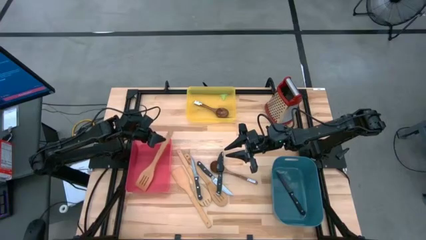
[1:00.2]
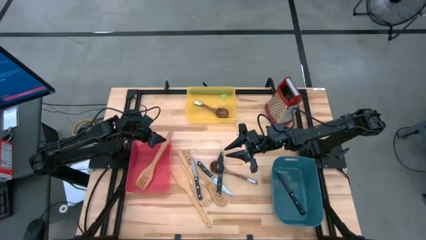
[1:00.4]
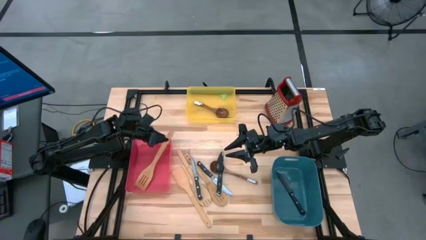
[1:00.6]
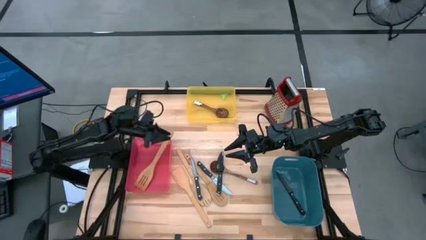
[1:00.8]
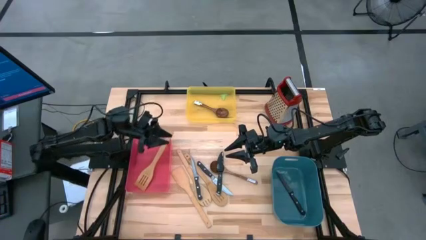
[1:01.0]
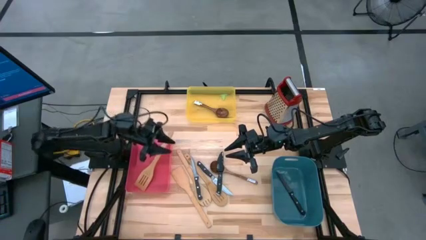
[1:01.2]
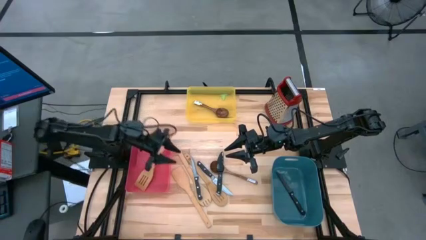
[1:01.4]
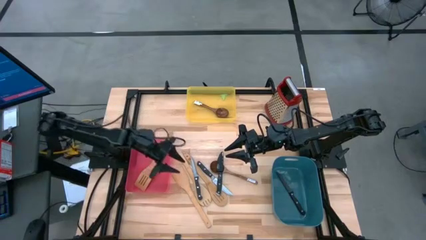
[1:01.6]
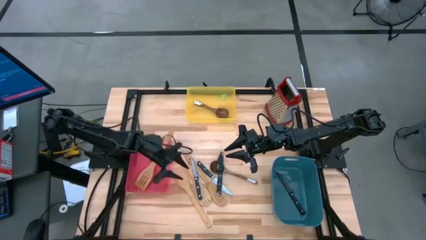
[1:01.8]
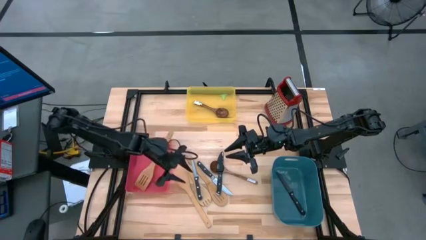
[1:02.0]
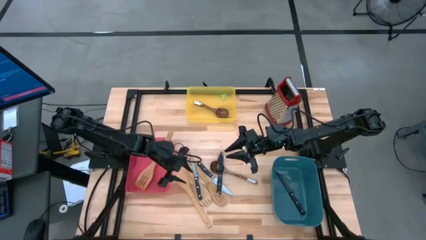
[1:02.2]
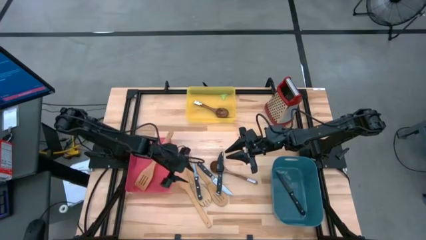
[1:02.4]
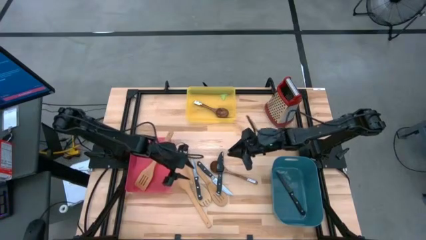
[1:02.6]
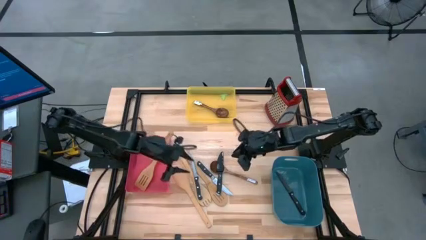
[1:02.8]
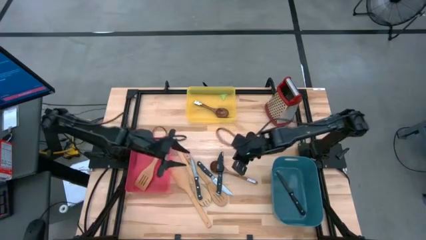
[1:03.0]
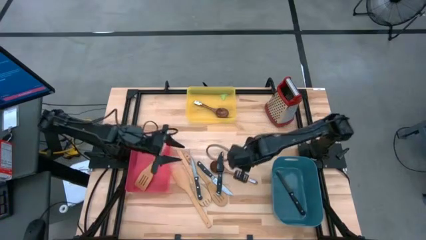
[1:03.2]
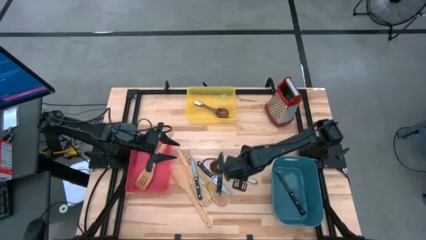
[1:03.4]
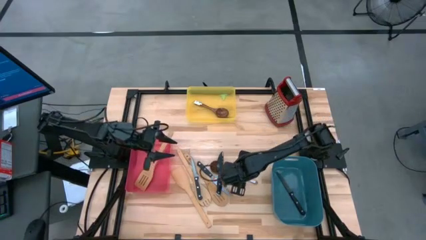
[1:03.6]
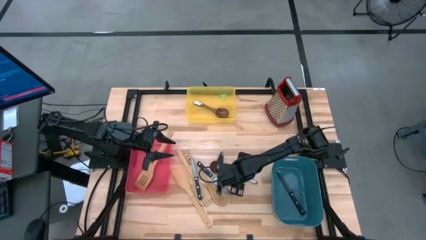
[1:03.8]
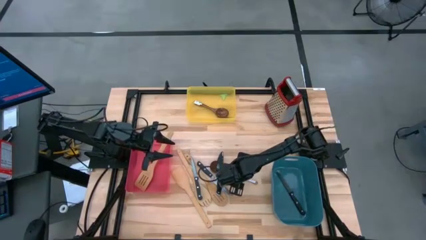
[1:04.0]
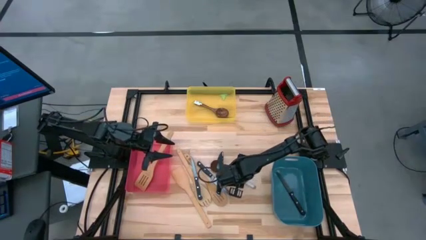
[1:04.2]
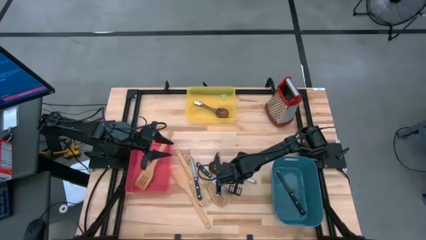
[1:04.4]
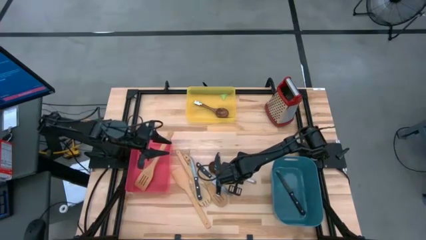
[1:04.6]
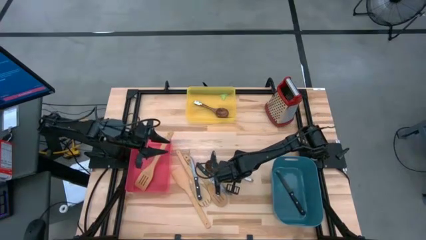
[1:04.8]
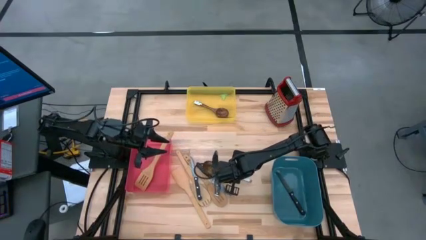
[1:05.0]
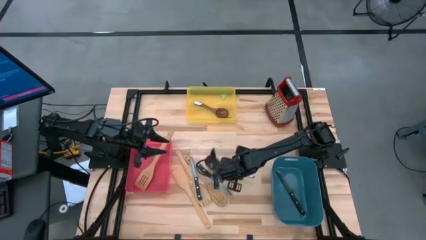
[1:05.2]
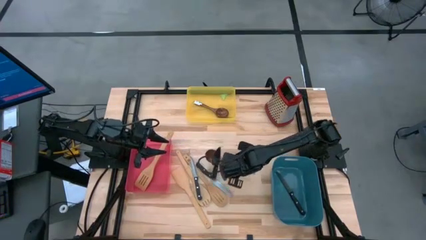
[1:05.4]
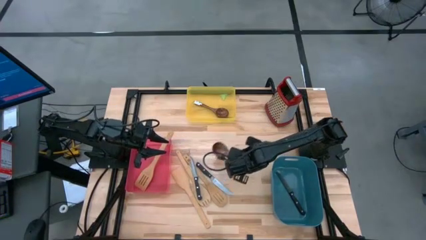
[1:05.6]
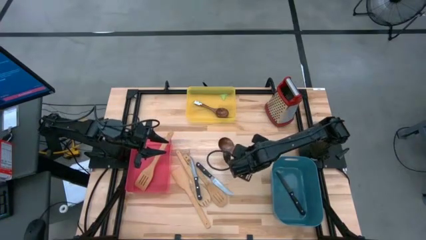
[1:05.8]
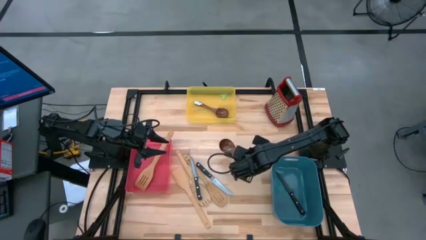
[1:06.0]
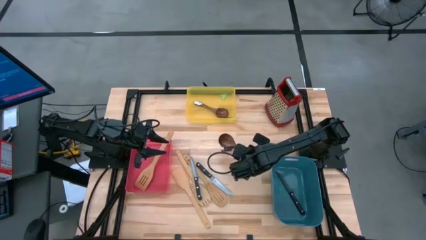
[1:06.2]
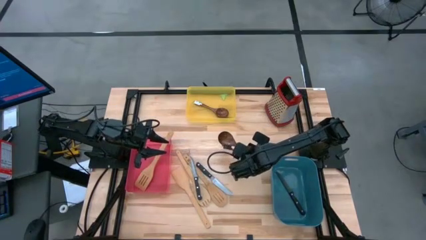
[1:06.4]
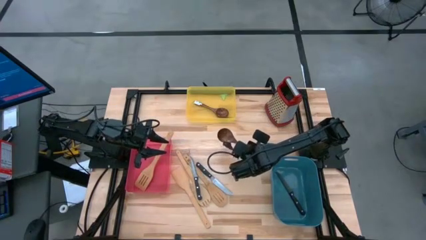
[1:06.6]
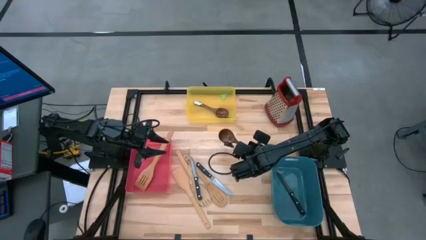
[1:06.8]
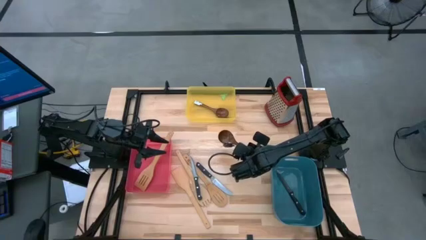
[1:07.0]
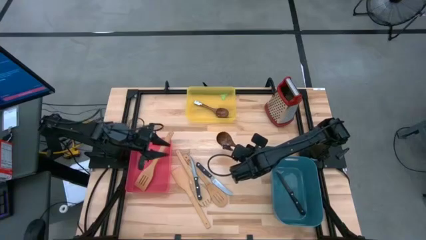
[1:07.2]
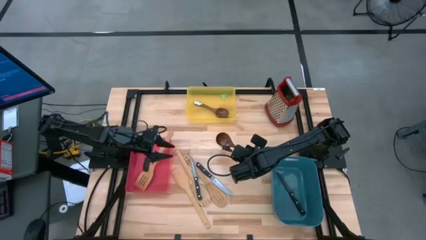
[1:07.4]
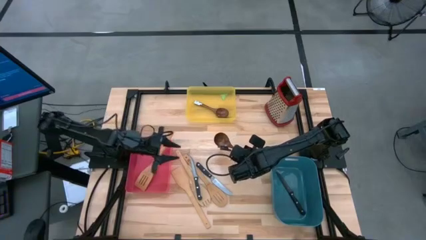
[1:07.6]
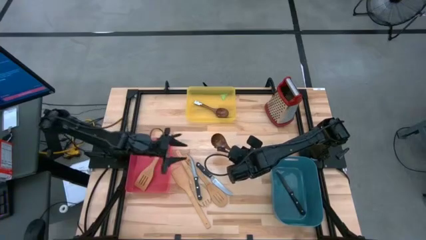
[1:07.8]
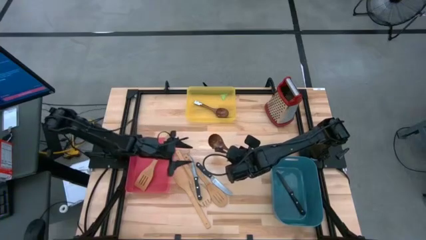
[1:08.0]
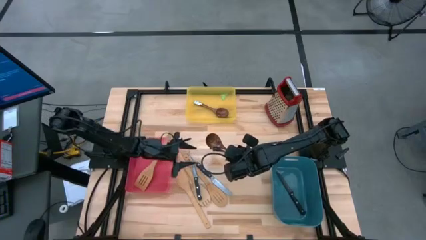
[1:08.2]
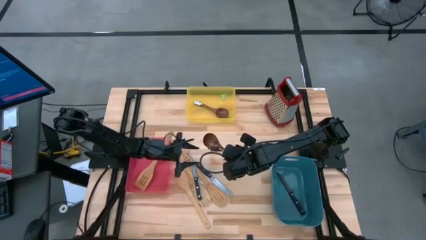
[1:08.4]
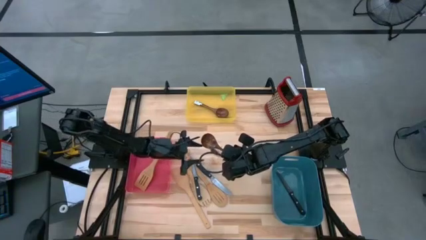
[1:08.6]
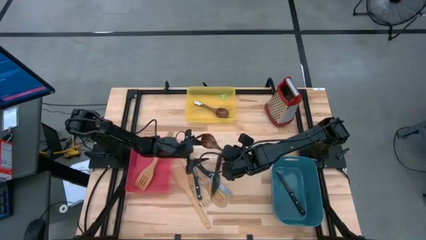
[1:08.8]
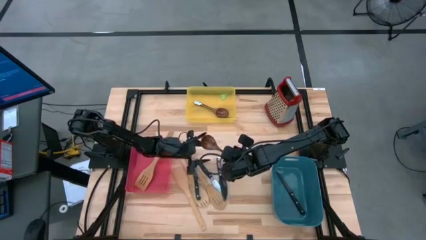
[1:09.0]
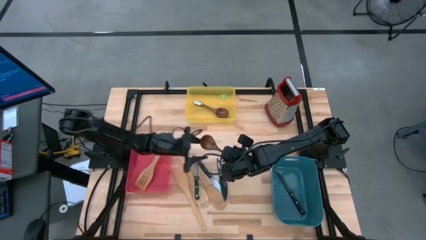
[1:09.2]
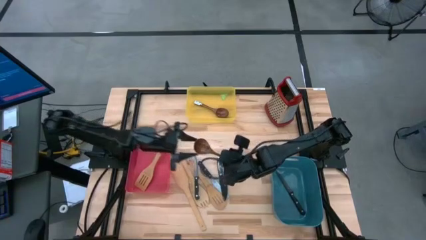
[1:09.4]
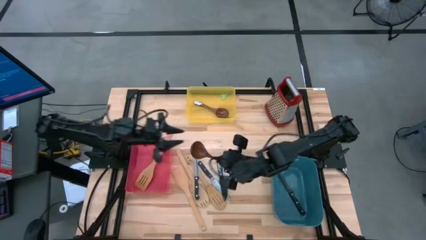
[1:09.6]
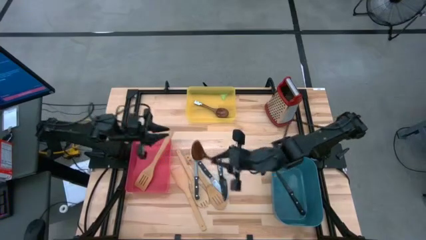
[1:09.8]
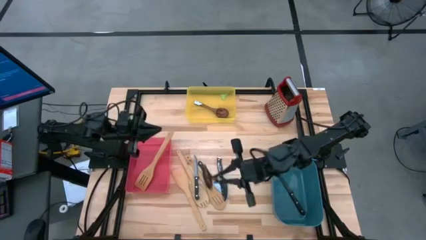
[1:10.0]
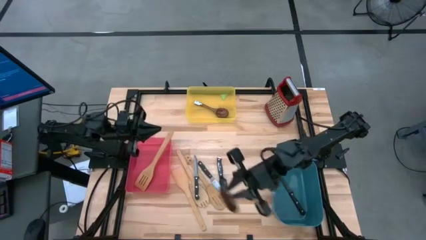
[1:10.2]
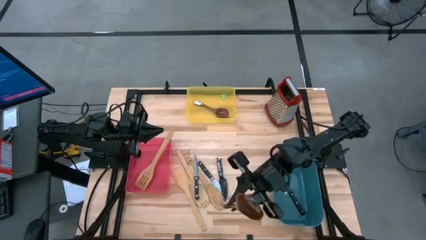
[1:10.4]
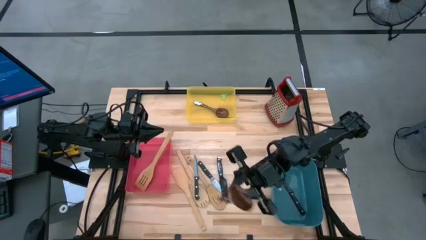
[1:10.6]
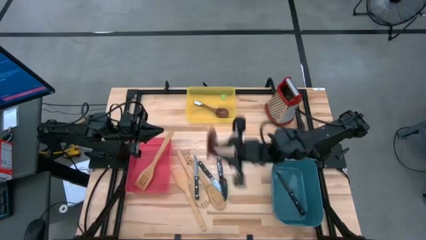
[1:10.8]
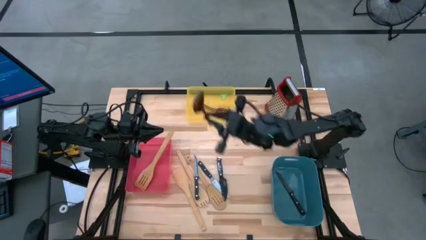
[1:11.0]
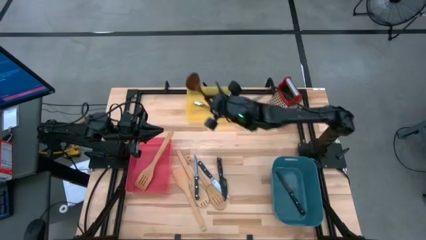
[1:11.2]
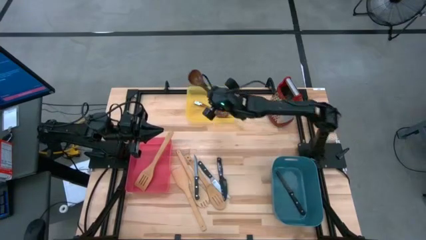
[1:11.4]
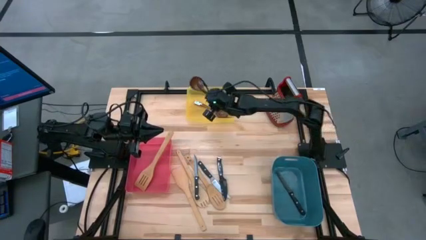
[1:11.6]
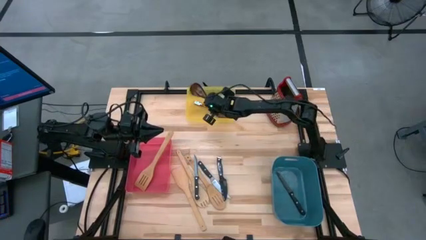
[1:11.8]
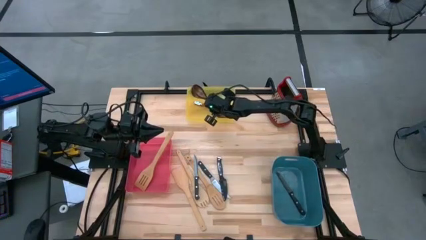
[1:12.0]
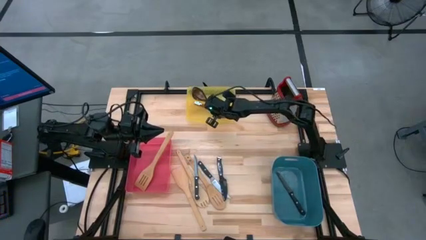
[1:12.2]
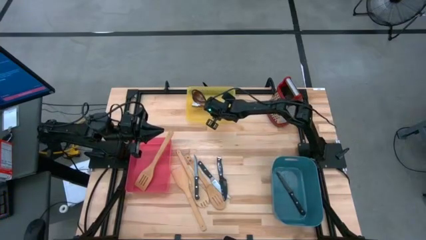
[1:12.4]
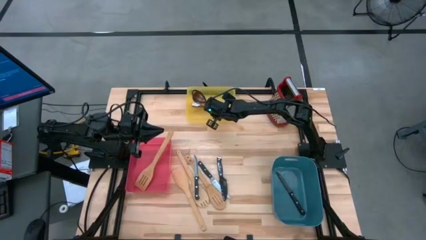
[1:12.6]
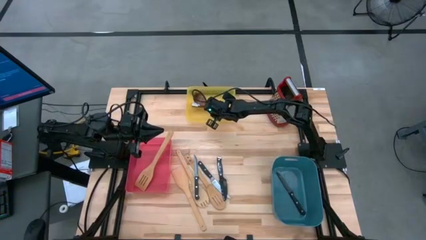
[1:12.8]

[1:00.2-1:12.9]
Task: Pick & Place Kitchen Items
Put the brown serving spoon into the yellow bin

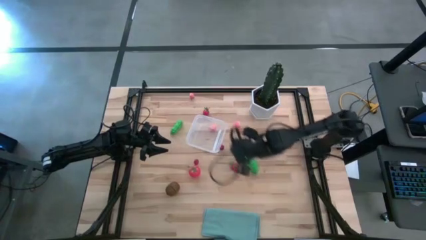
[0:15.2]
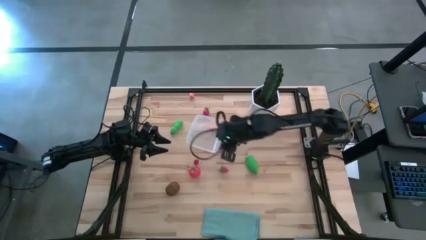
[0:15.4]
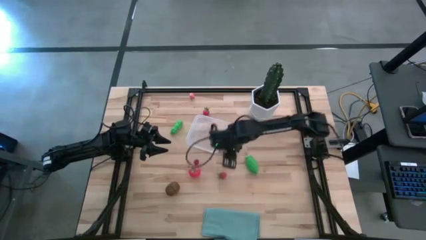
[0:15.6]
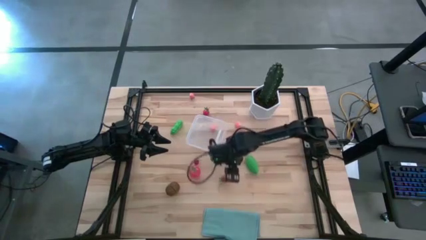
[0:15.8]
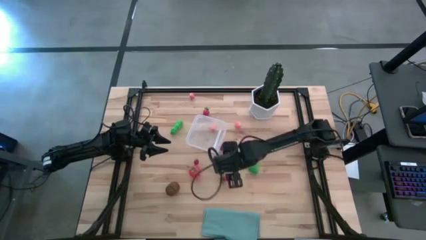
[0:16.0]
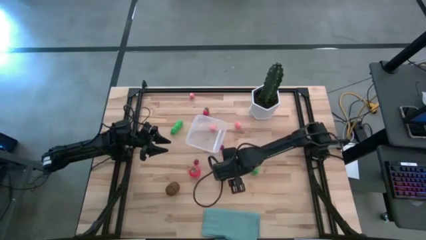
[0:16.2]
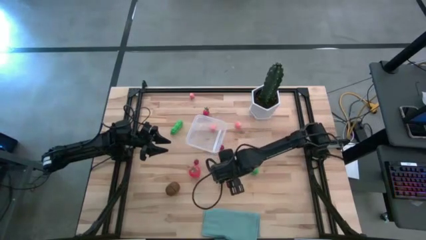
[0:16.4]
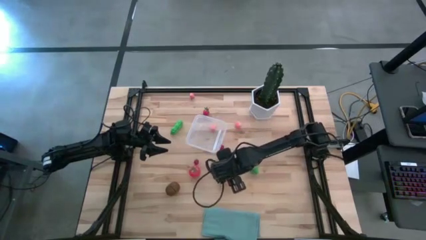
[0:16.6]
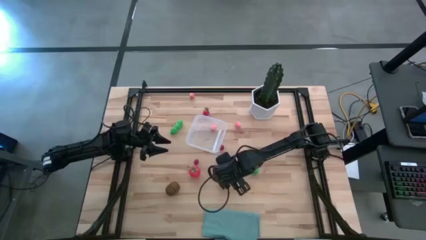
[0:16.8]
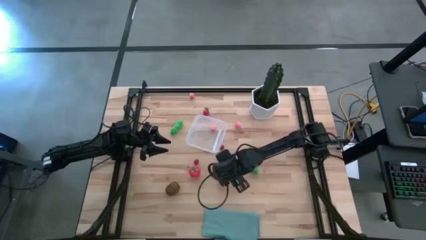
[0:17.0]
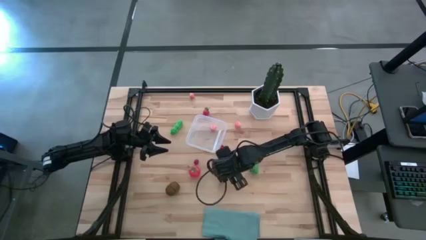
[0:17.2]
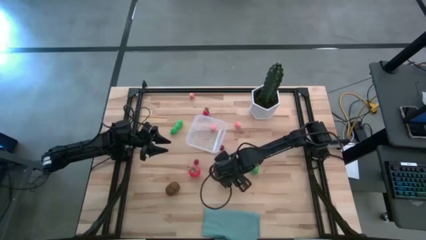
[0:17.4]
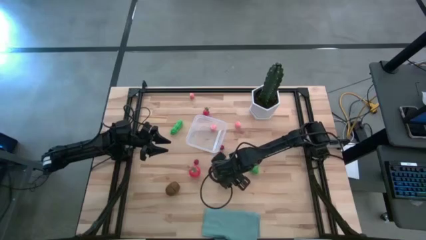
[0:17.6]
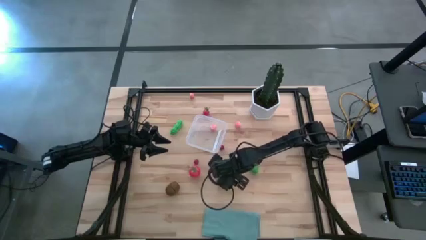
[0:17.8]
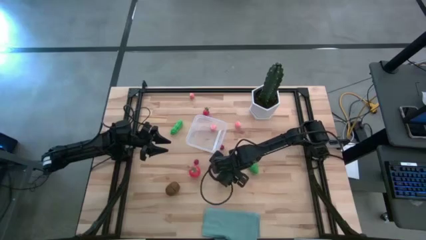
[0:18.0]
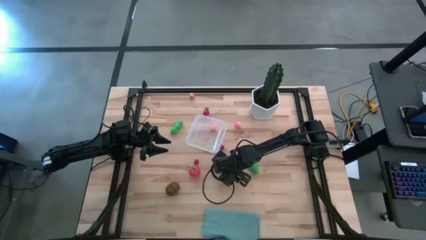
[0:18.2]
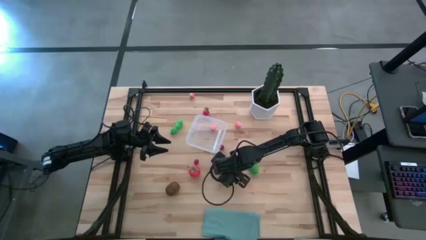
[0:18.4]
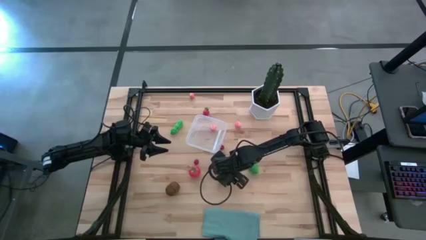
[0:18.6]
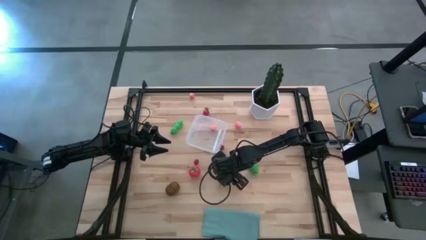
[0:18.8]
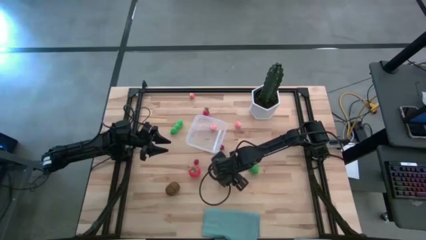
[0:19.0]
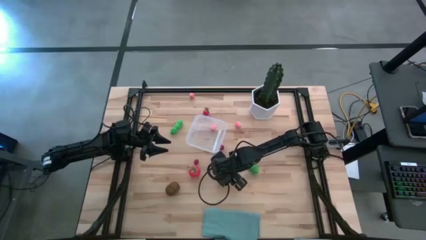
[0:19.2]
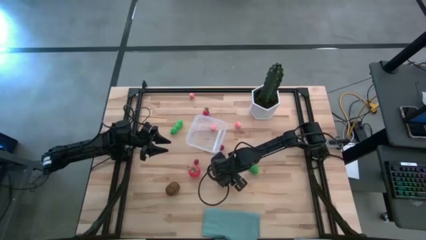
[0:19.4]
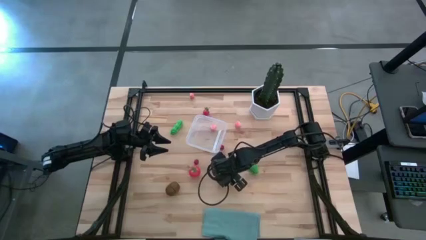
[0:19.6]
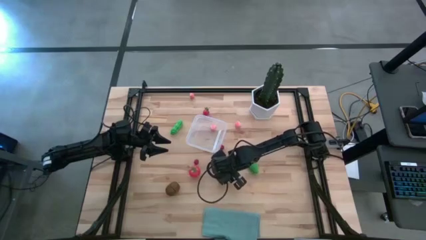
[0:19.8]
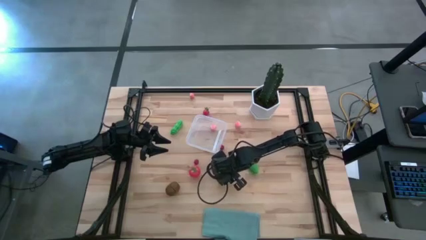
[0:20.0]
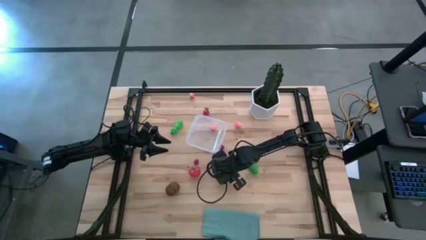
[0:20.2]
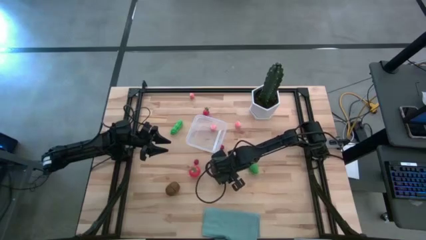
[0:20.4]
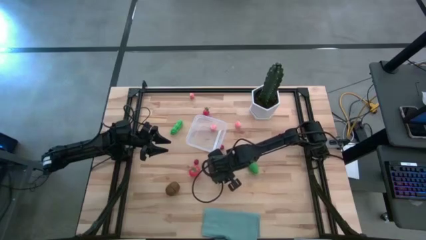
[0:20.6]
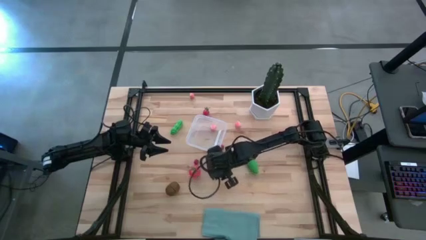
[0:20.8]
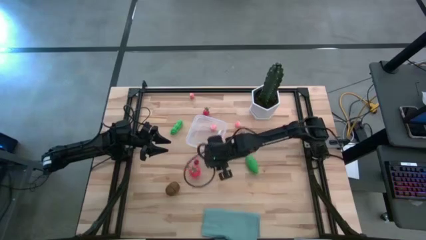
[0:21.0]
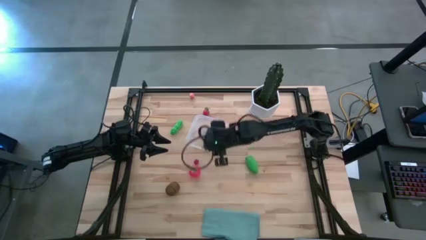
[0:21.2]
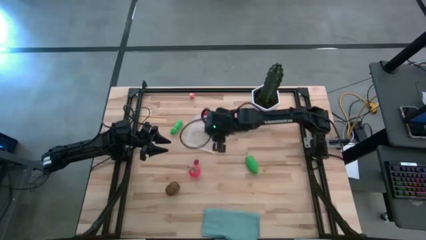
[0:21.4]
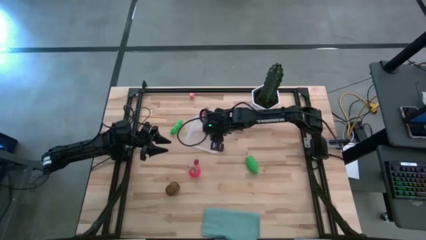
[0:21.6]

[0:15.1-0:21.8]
Task: Pick and placing Produce into tupperware
Put the right red strawberry into the transparent bin
